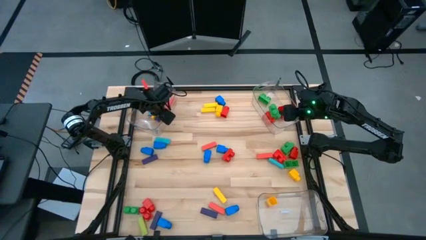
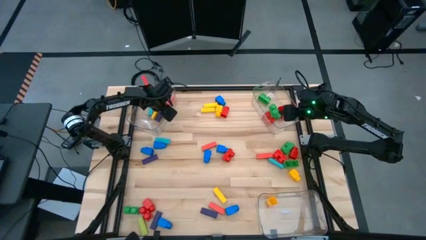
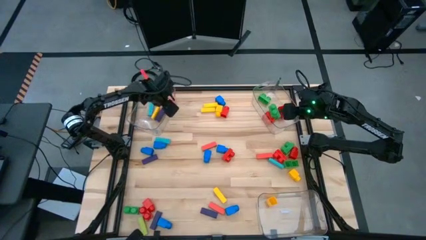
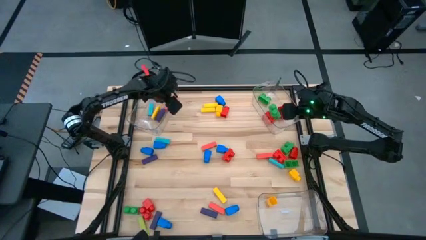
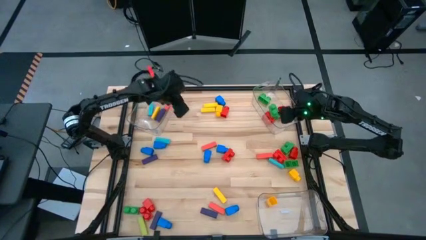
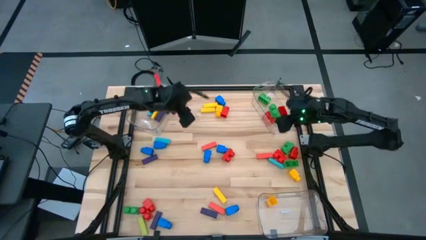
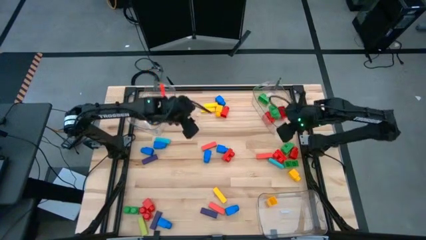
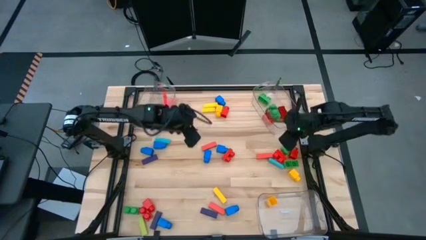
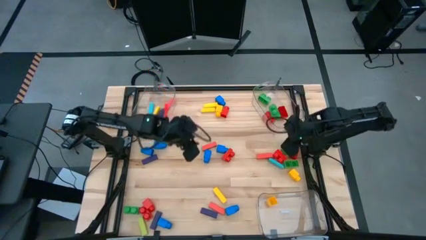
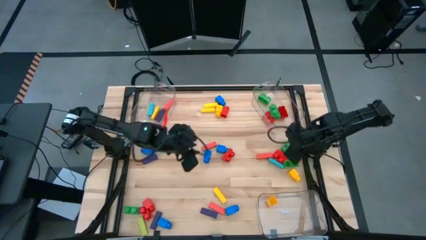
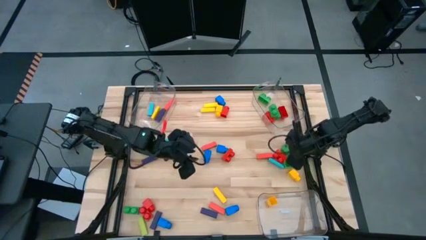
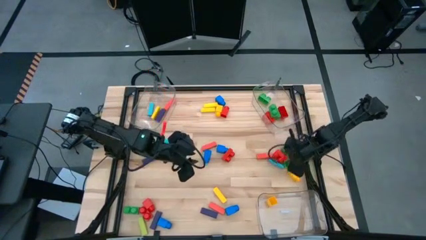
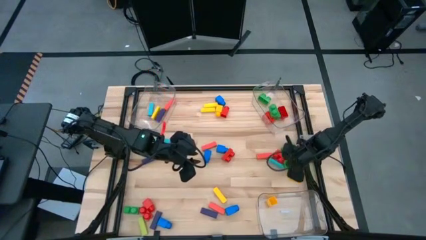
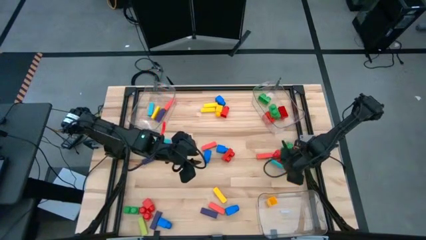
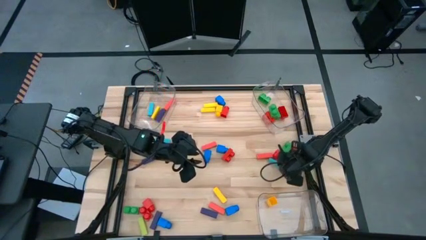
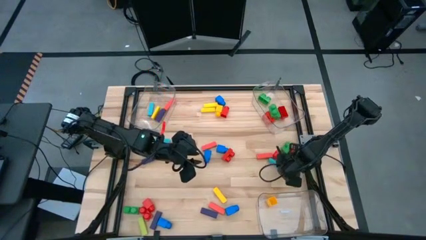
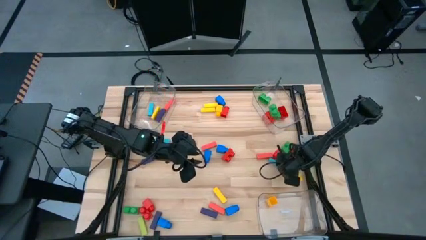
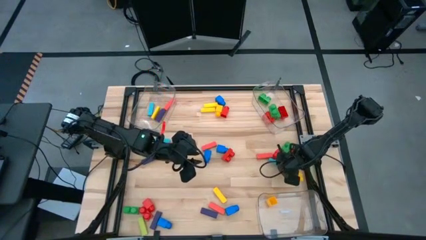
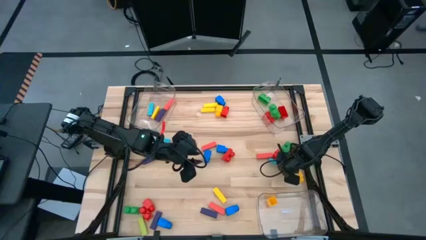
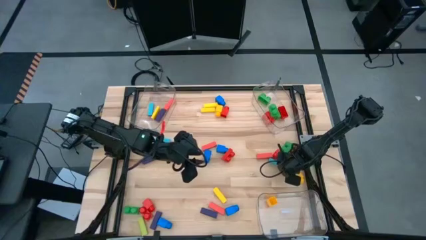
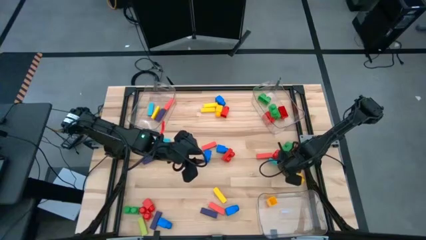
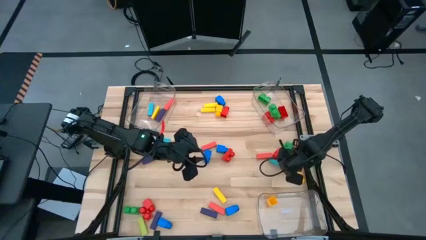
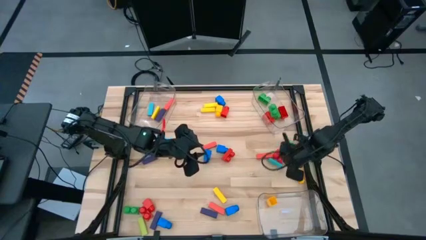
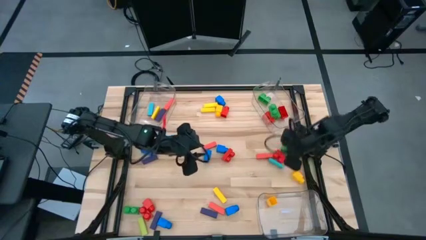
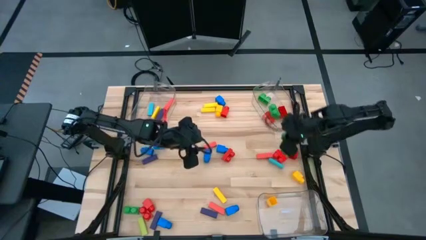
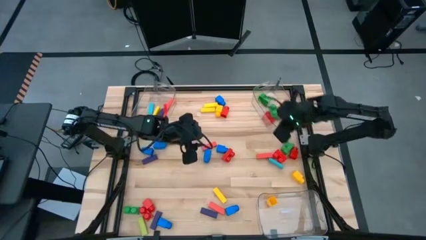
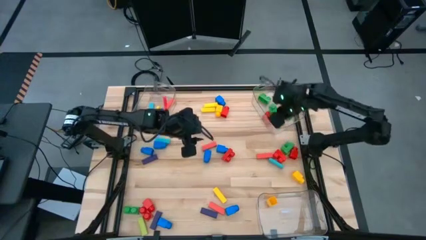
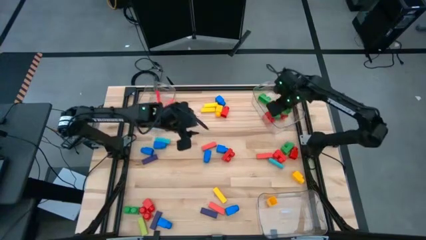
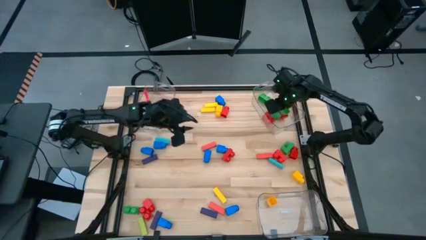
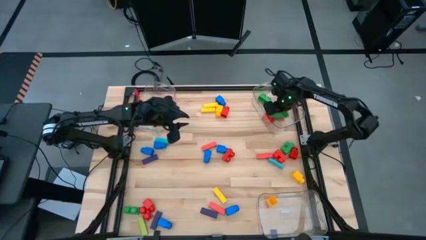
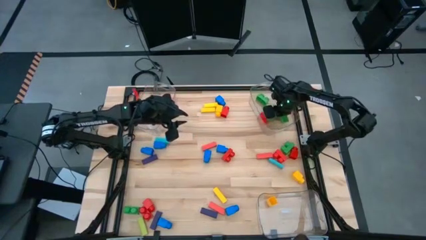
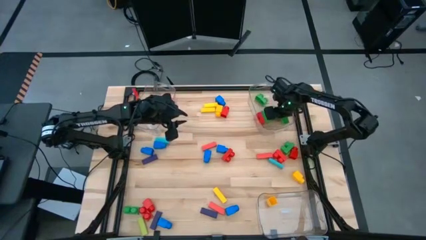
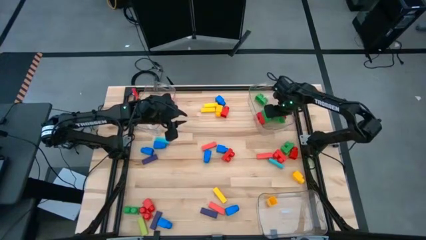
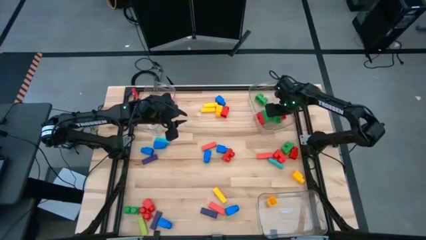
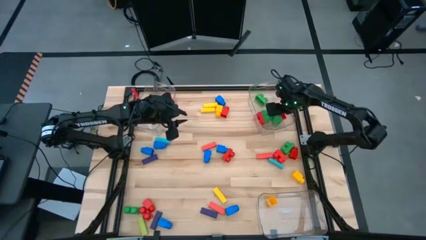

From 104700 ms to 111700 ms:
Task: Sort blocks by size
Put the green 2 stud game piece into the top right transparent bin

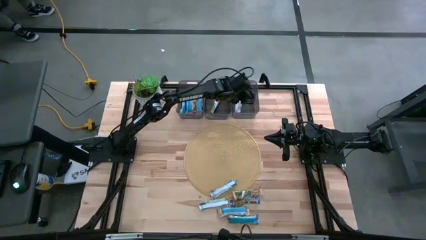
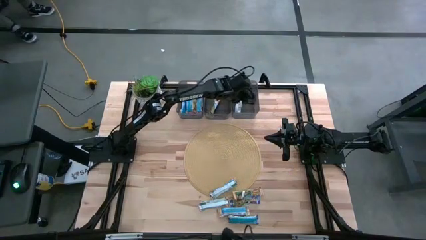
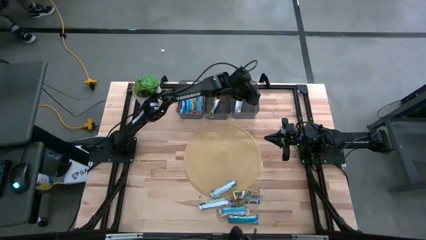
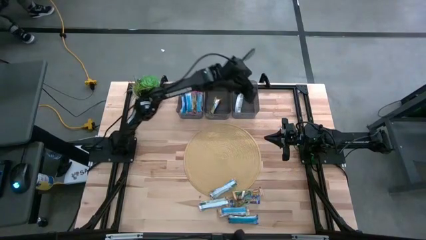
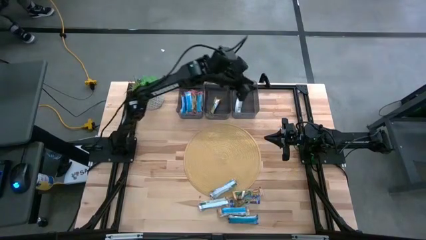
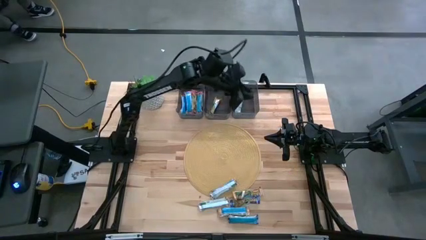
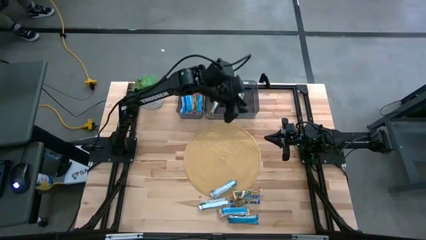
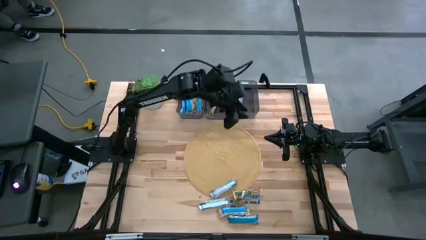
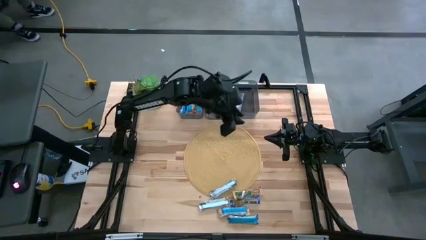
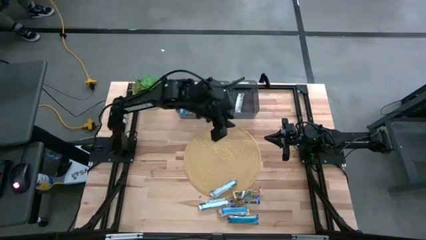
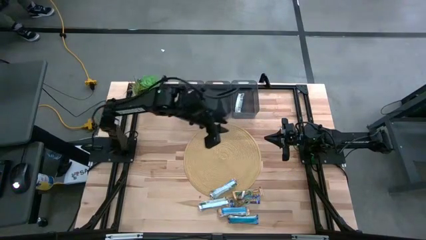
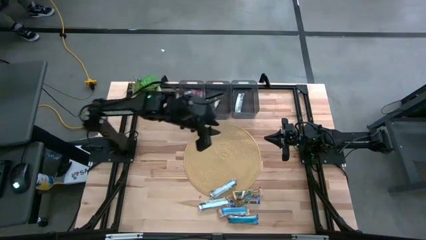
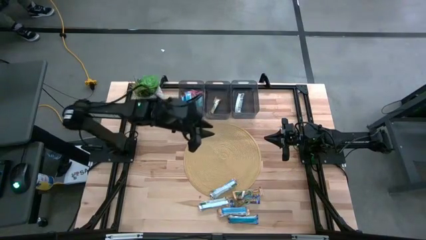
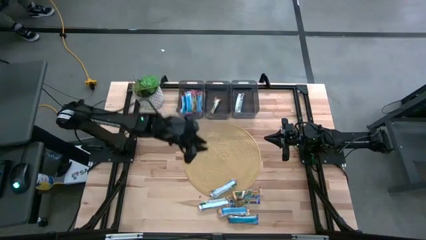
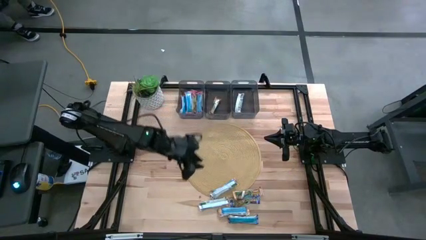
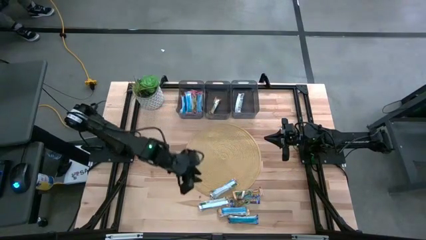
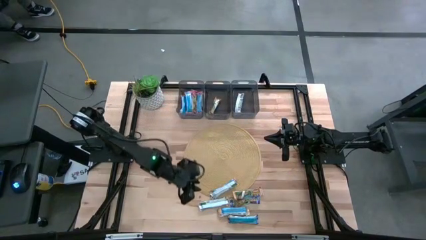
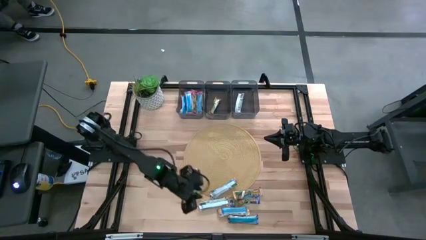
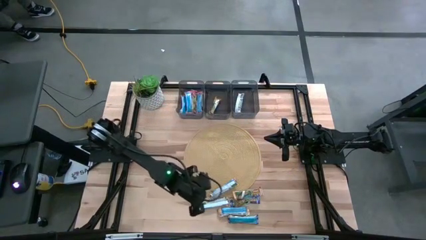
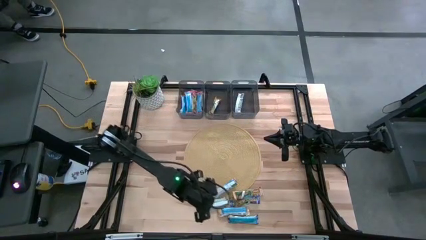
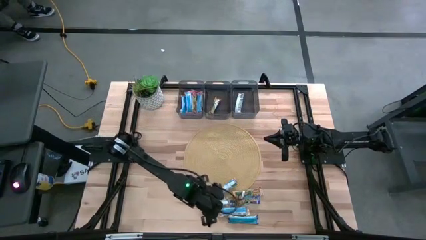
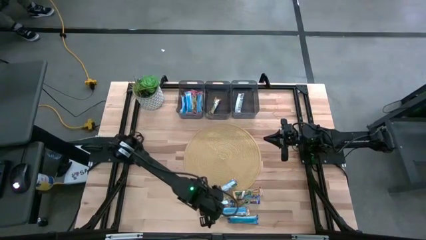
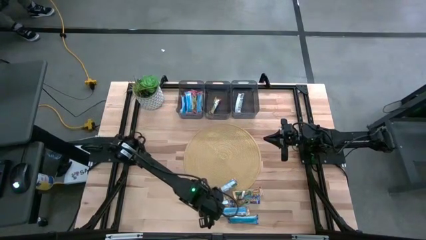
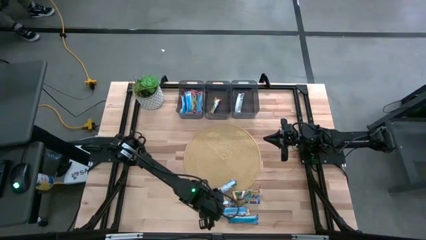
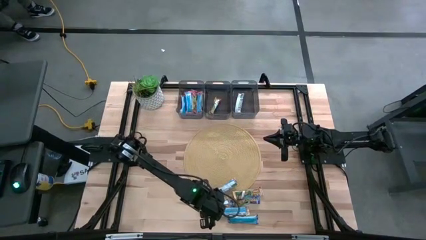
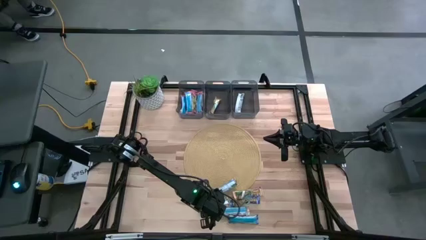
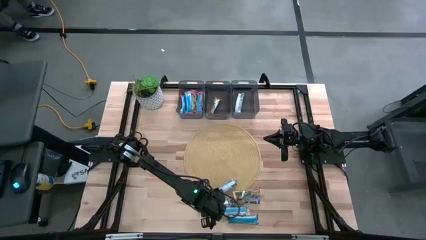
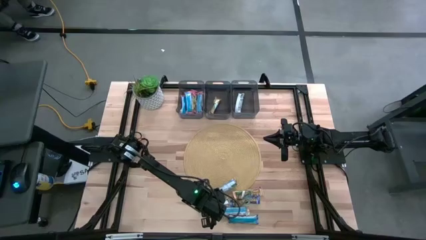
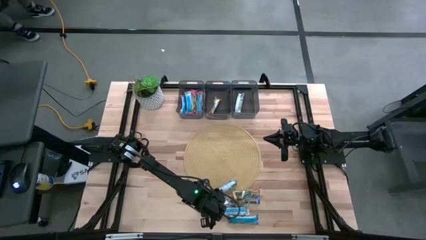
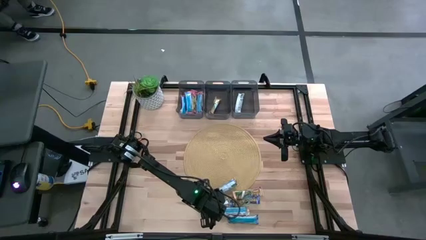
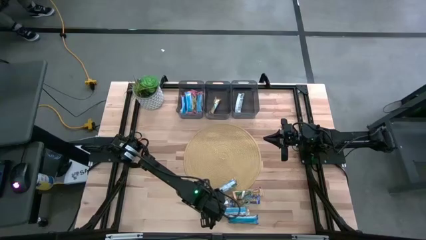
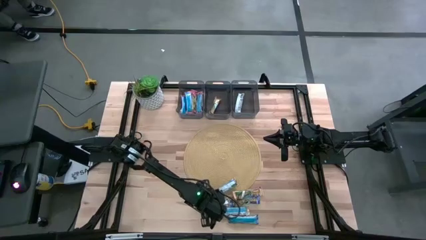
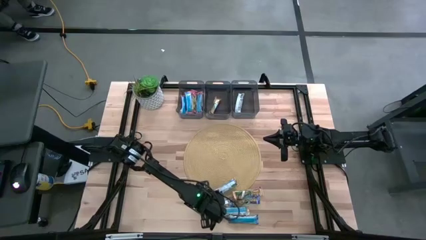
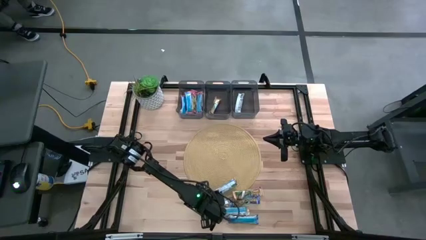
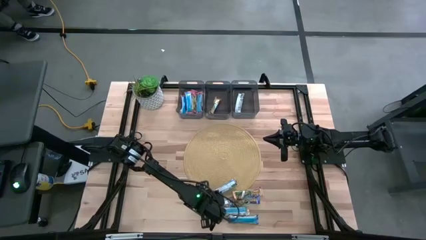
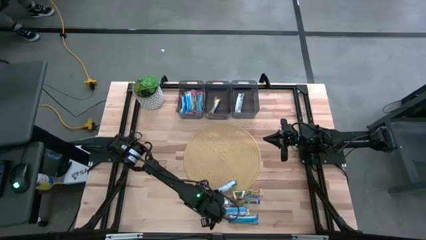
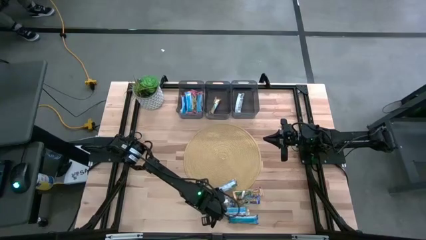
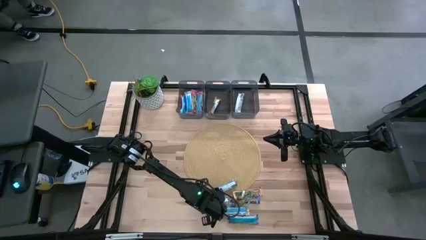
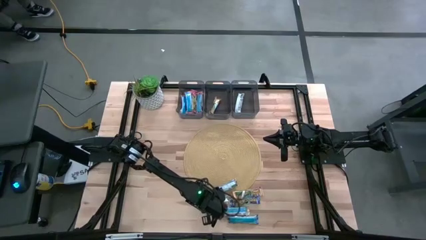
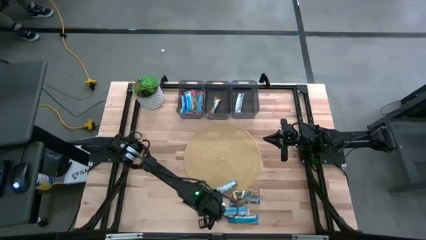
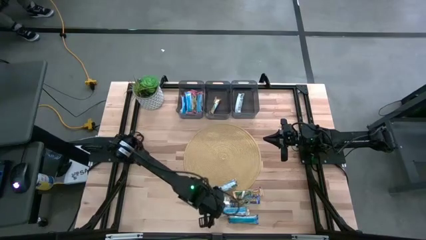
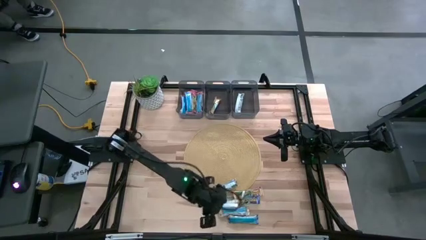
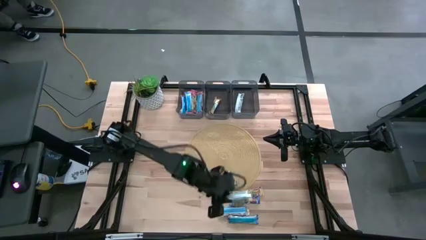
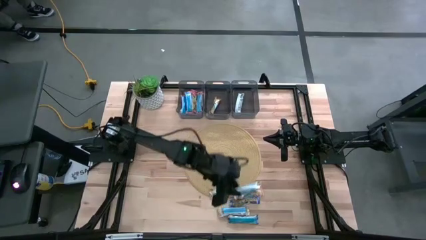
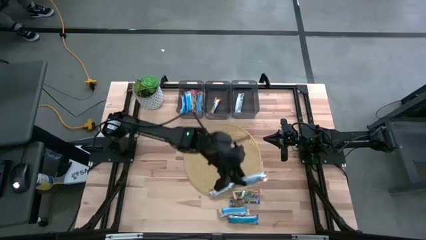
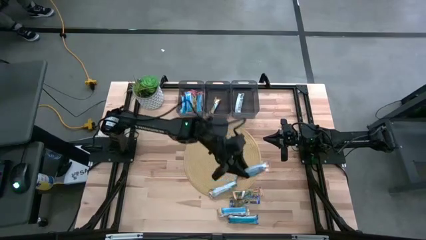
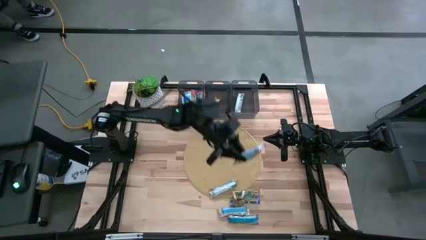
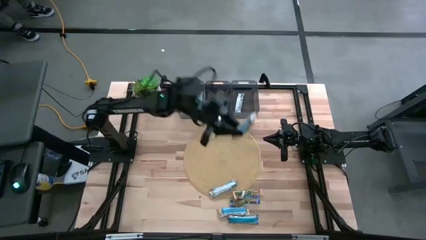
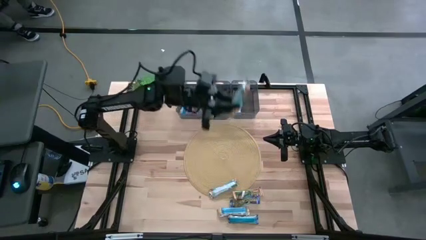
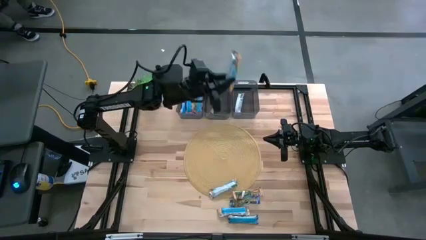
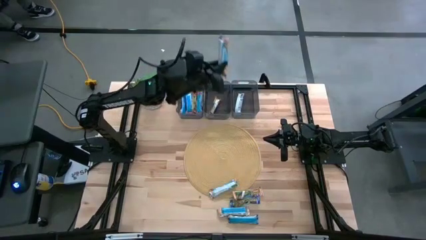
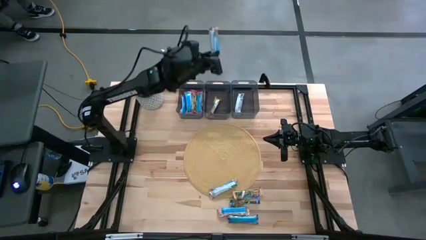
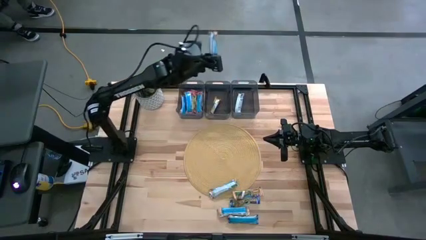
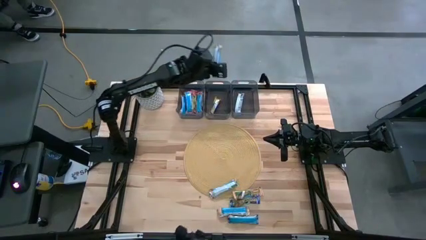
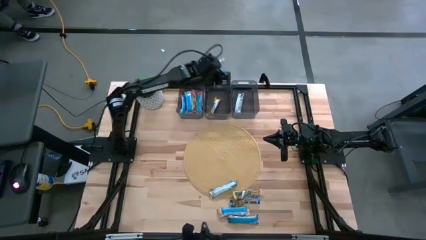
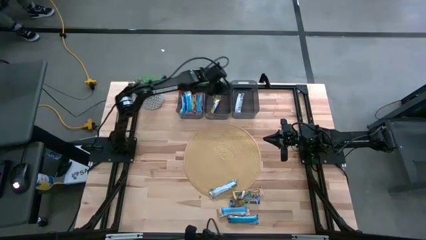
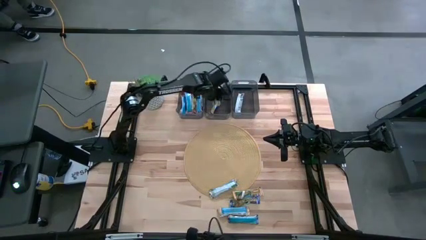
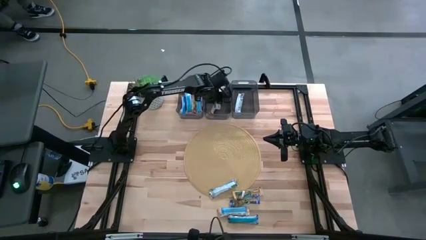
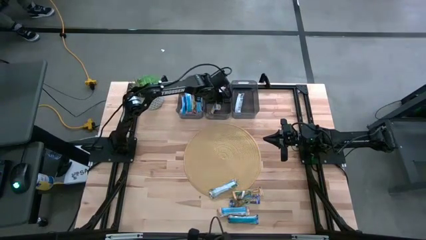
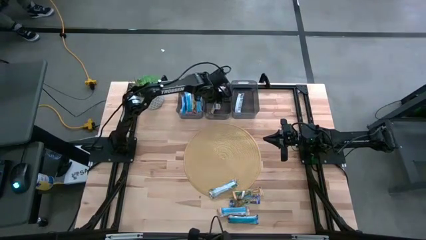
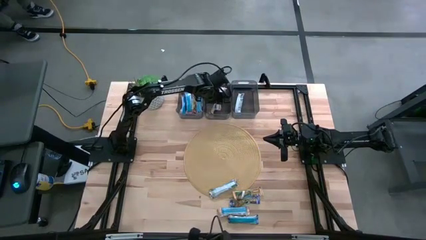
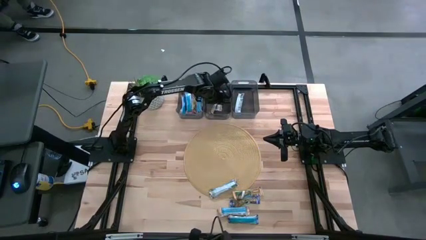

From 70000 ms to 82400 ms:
Task: Pick and place Granola Bars by type
Put the orange granola bar into the center black bin
